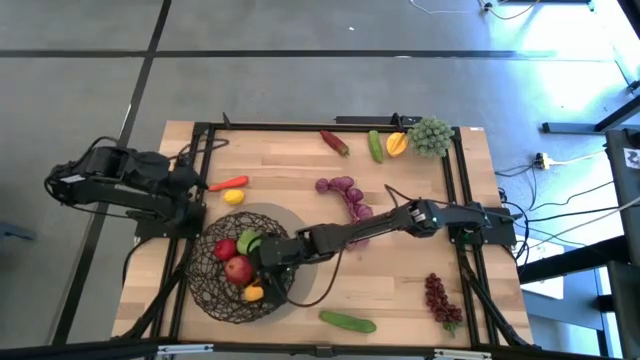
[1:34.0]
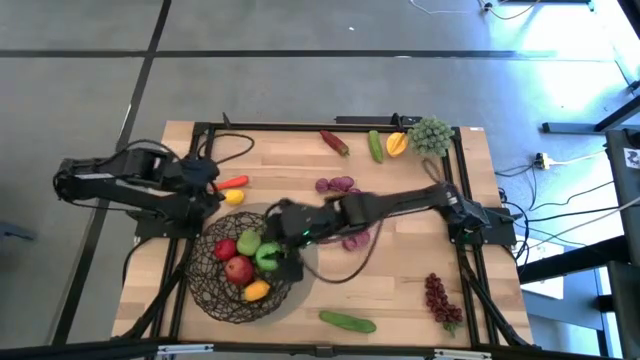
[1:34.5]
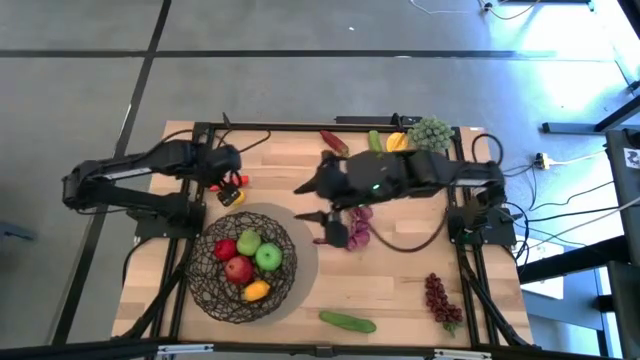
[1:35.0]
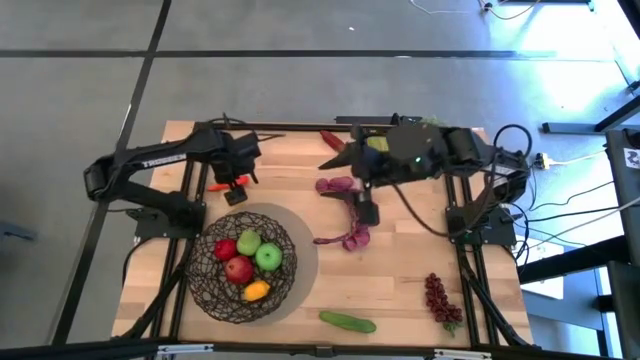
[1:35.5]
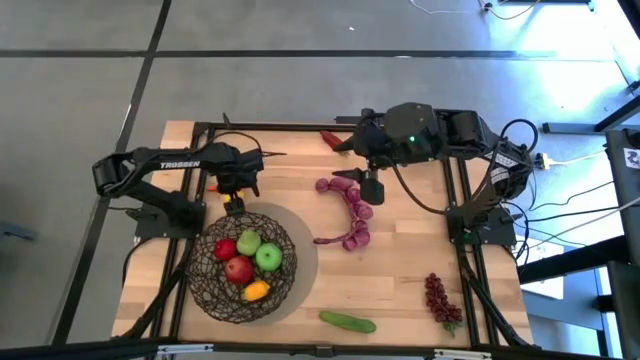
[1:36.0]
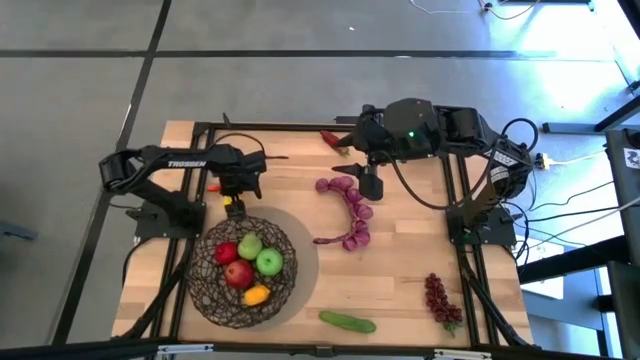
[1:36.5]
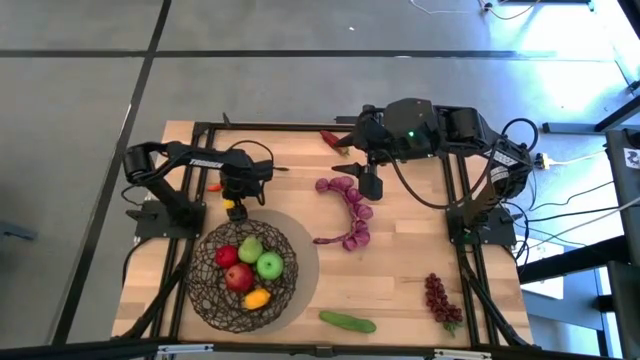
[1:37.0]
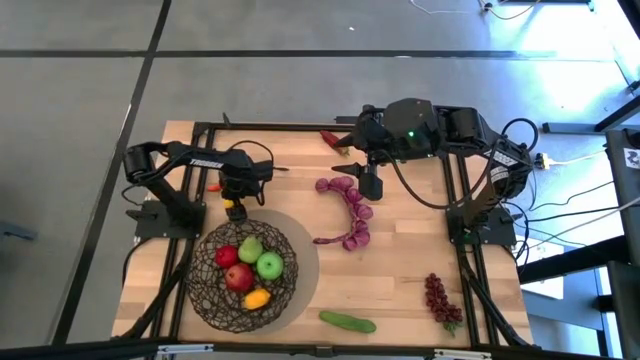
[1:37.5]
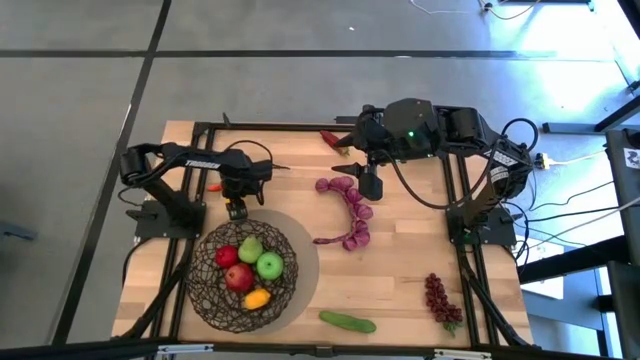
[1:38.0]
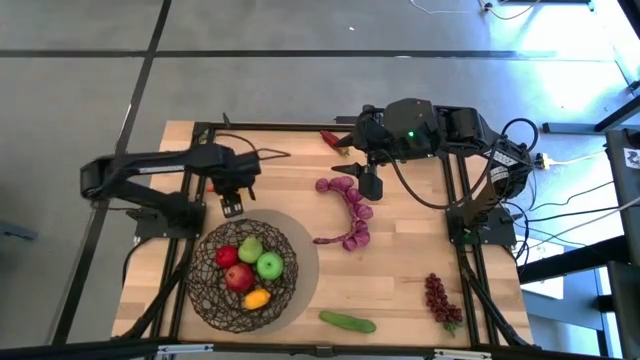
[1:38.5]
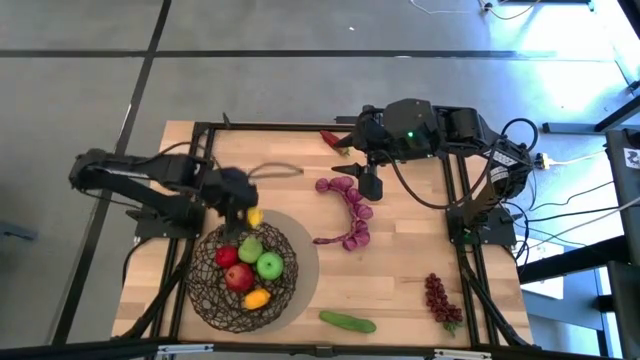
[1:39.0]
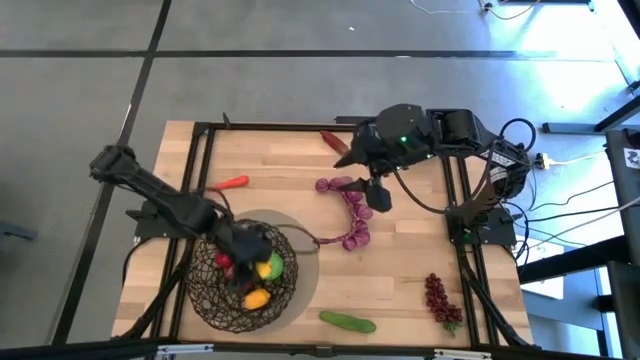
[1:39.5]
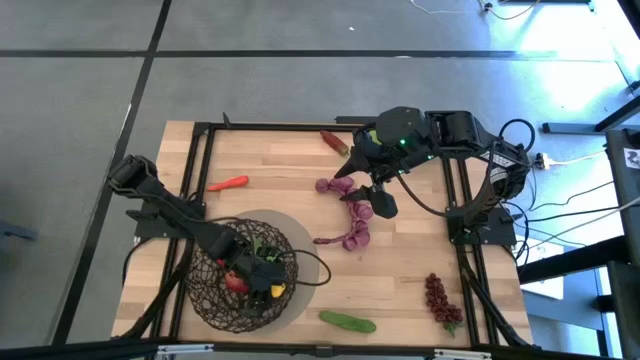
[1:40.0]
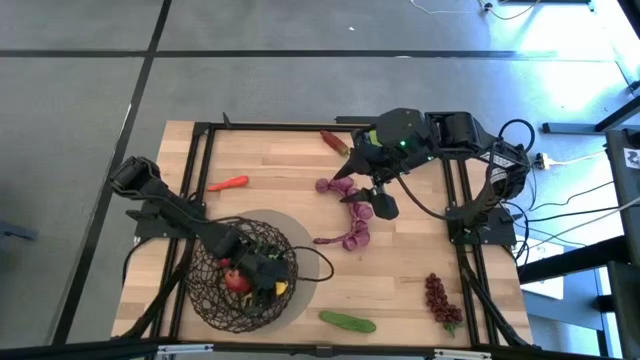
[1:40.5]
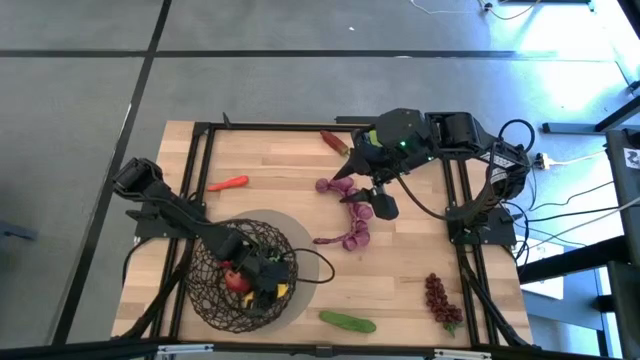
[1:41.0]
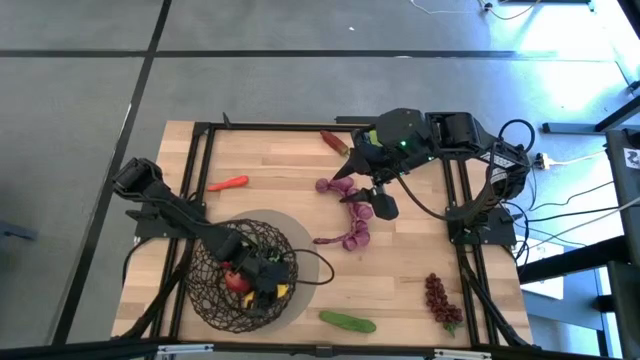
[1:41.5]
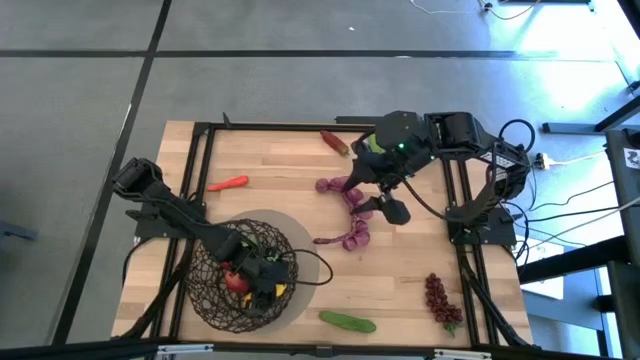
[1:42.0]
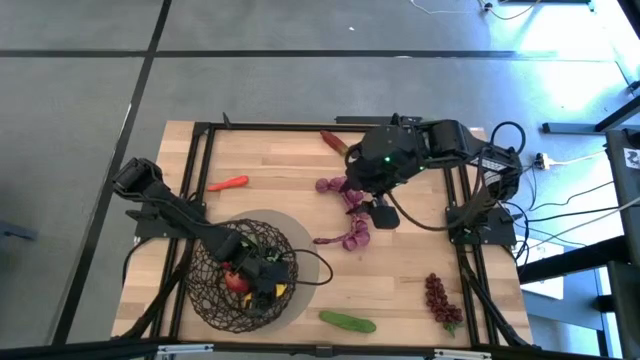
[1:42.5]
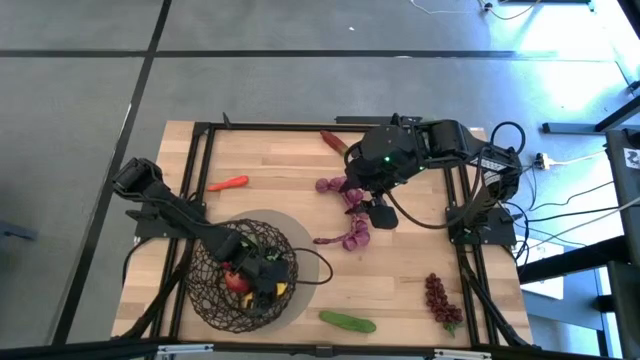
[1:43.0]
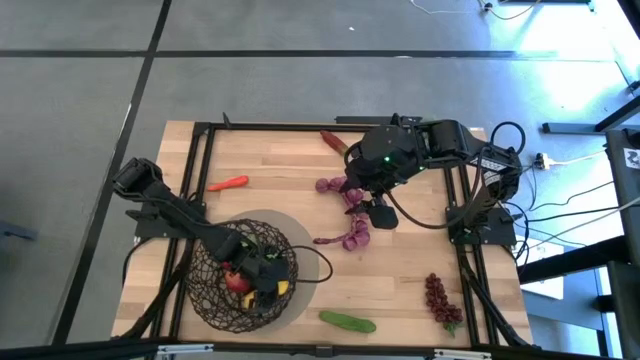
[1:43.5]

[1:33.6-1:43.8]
Task: Build produce basket
Put the yellow lemon into the black wire basket

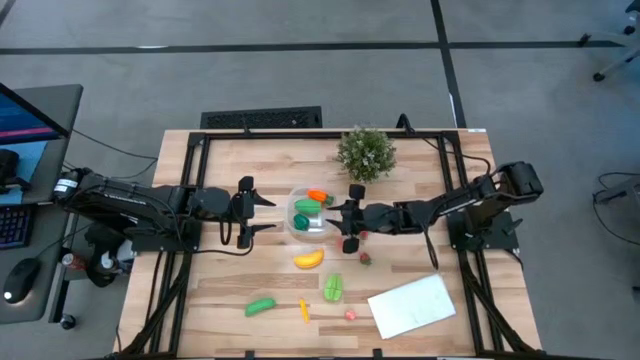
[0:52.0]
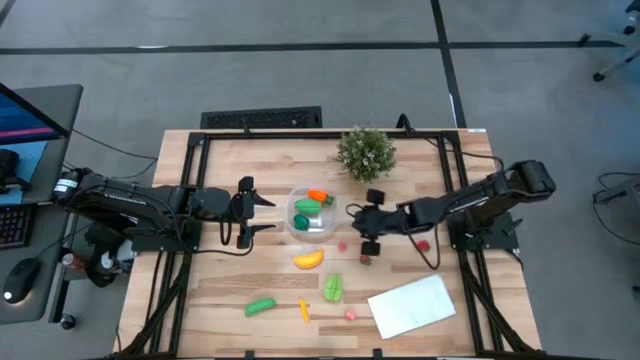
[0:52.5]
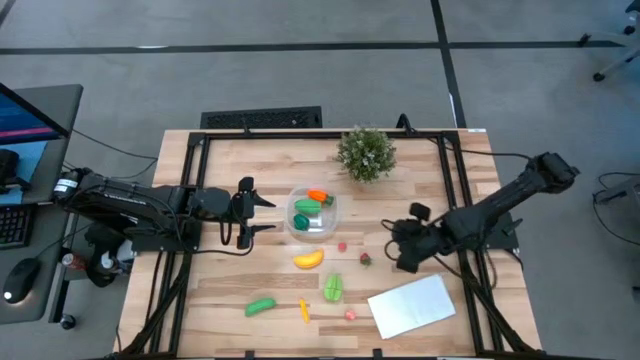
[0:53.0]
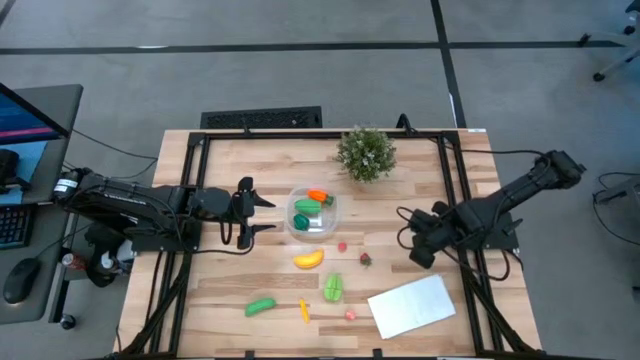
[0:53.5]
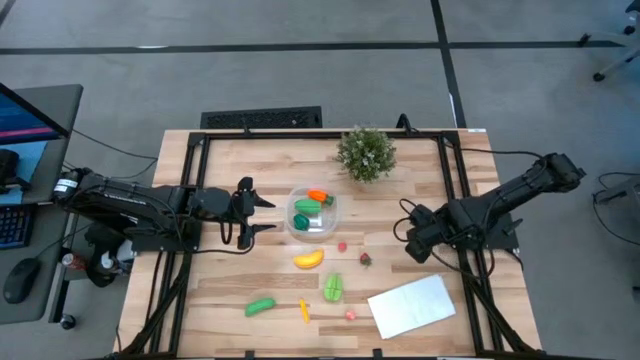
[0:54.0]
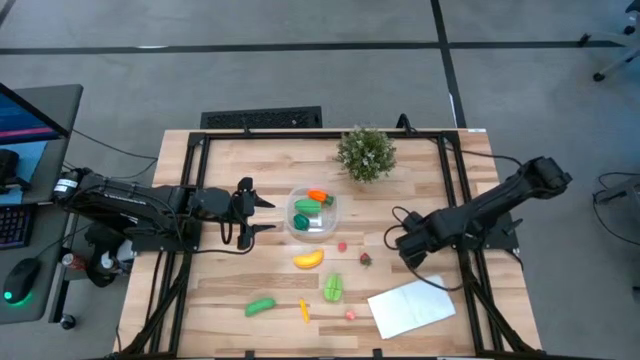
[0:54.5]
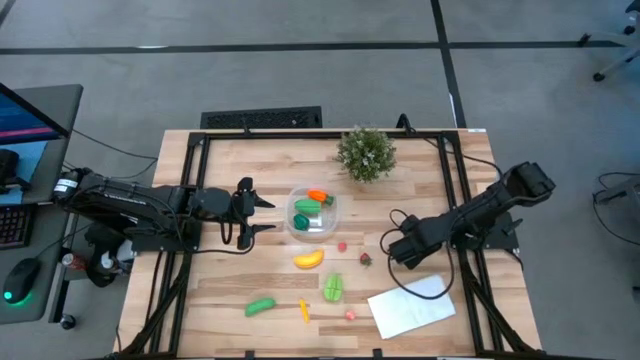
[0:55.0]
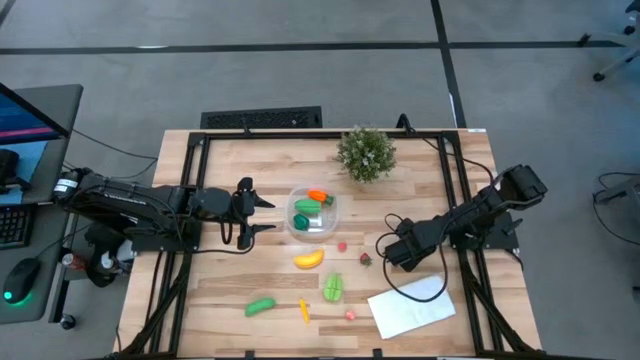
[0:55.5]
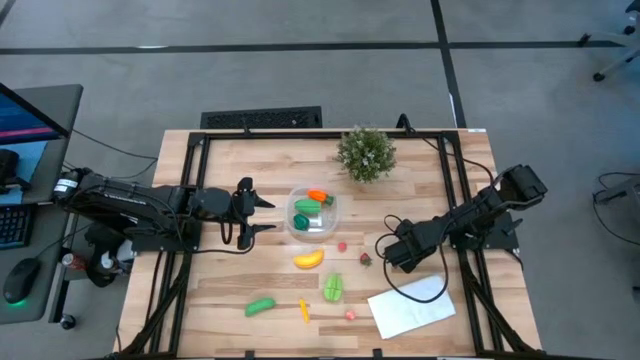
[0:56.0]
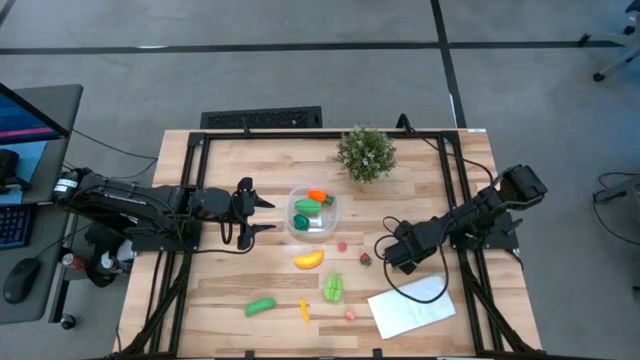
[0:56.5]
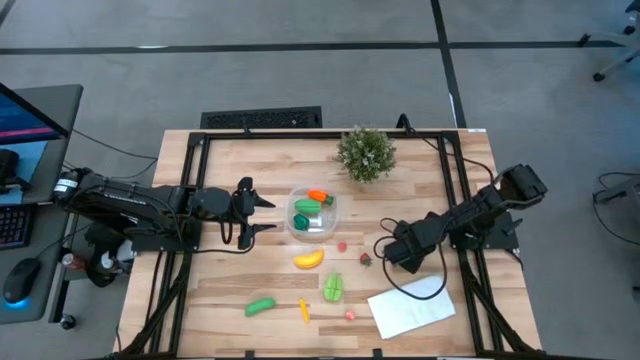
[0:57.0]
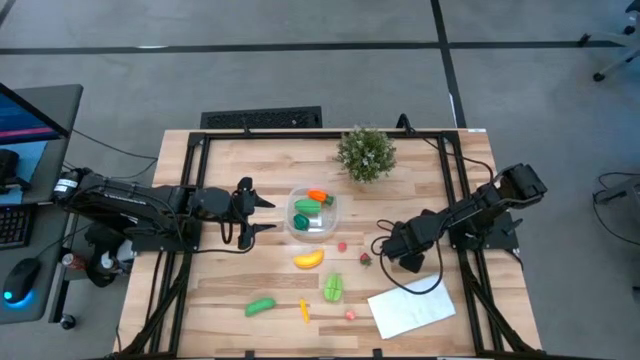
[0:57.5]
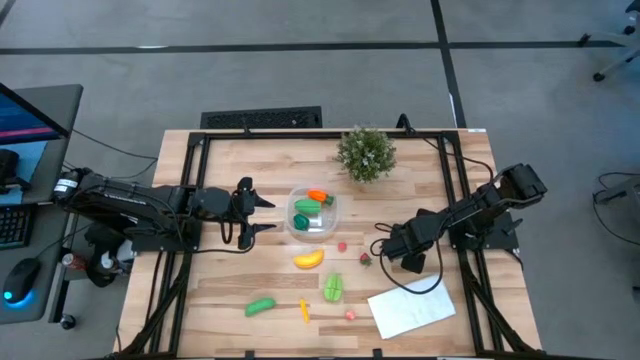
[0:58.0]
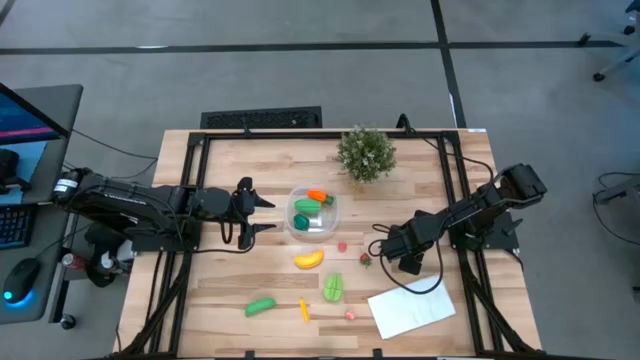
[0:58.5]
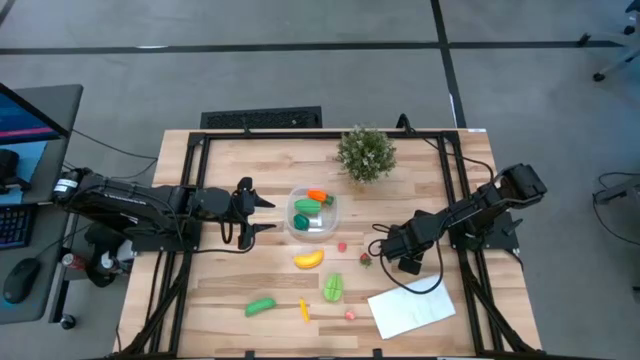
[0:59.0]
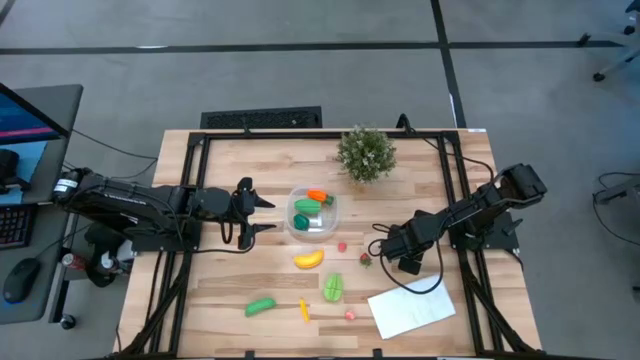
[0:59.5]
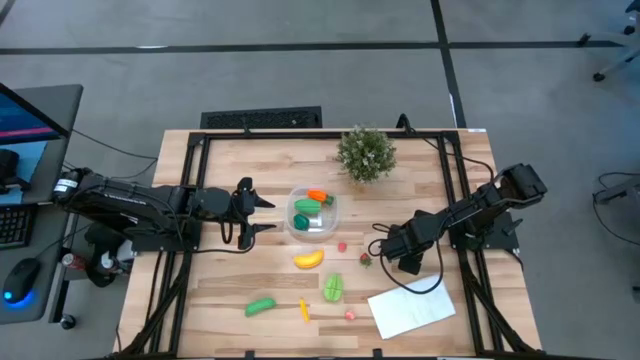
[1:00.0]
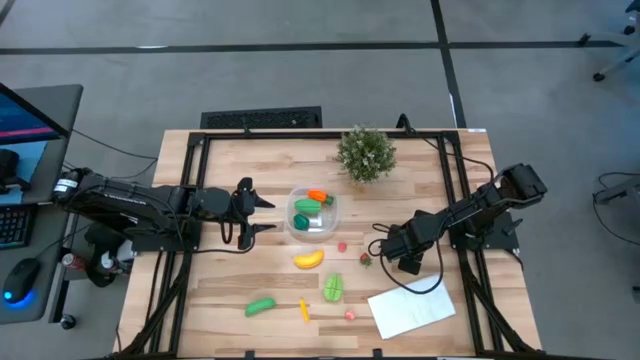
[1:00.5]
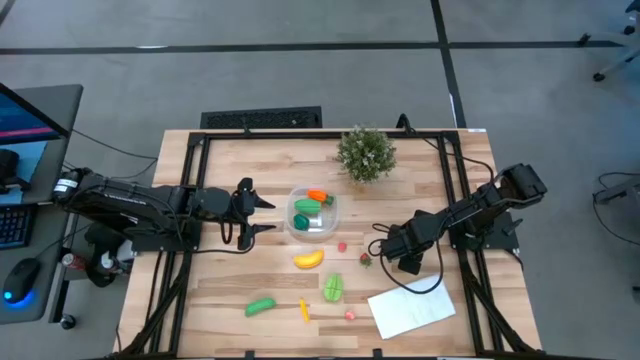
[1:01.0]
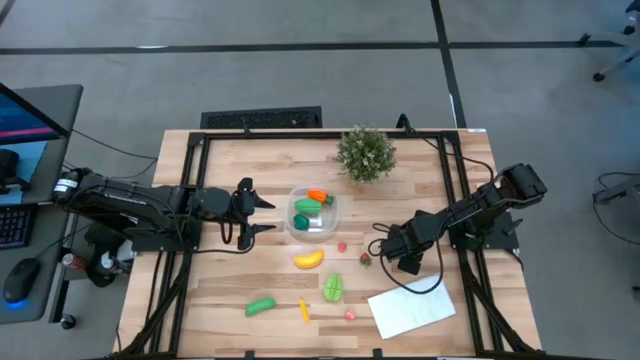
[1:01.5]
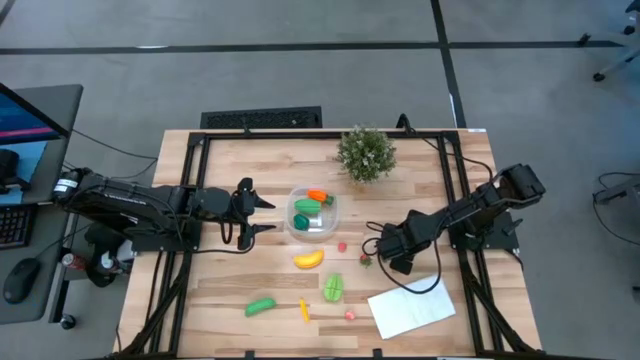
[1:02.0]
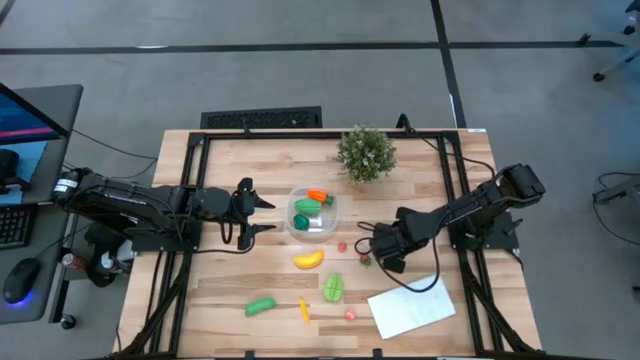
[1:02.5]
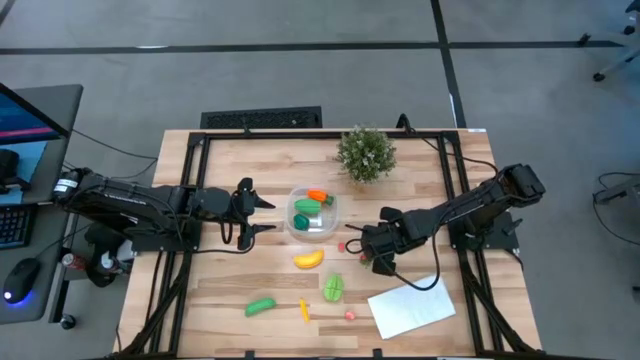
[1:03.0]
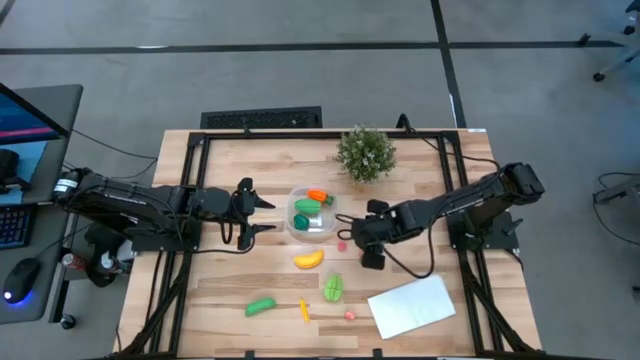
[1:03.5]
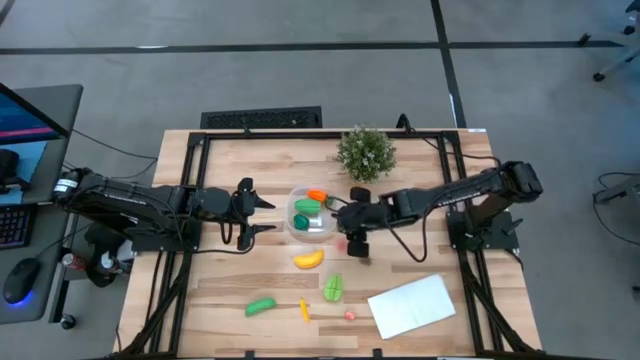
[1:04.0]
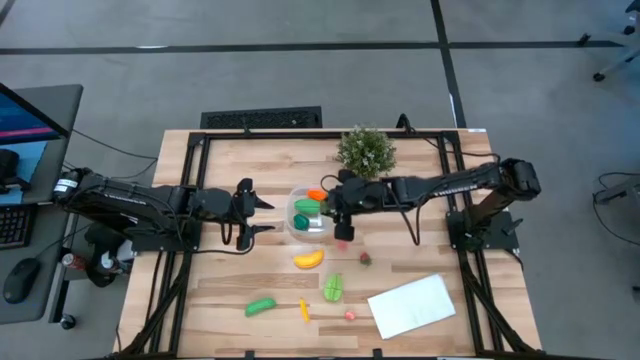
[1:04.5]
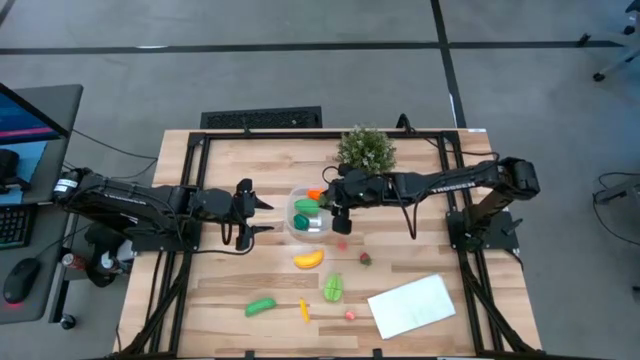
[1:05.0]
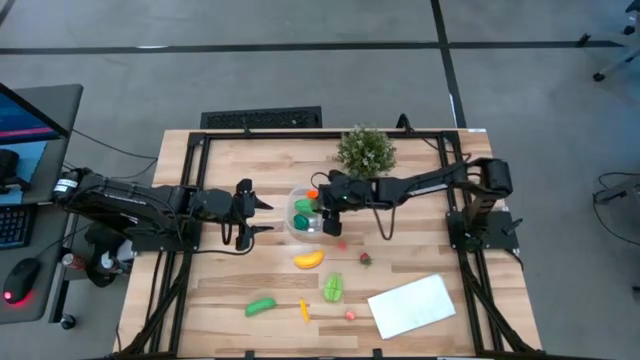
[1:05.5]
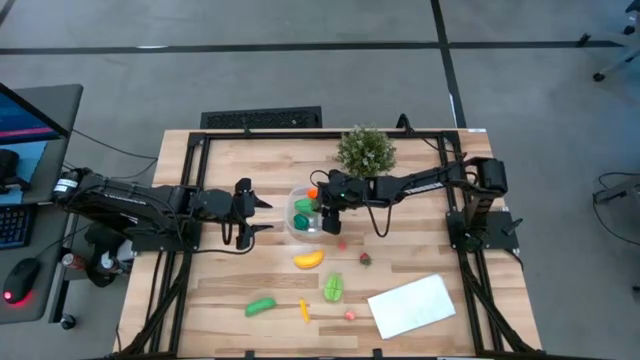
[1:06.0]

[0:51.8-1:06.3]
Task: Pick and placing Produce into tupperware
Put the right red strawberry into the transparent container
